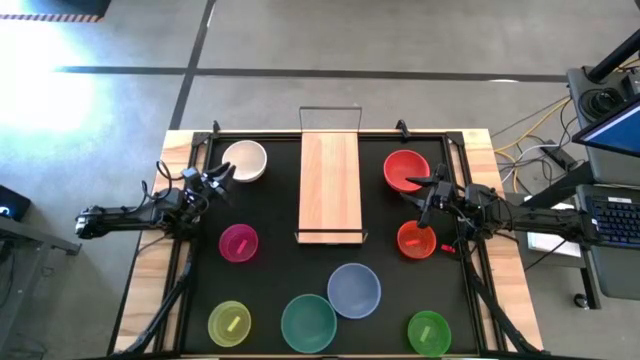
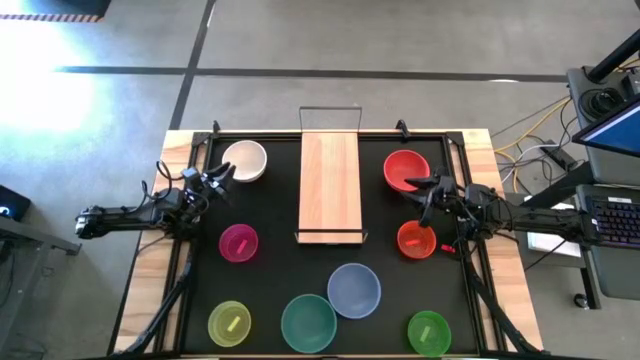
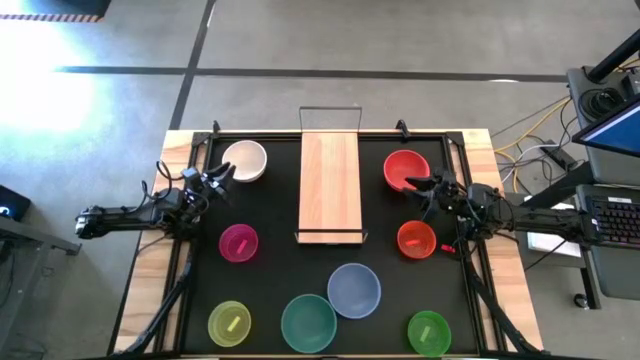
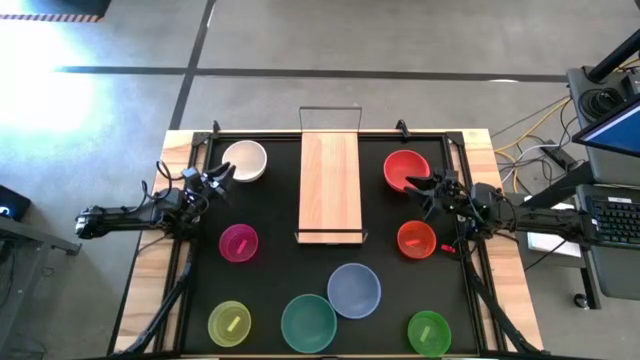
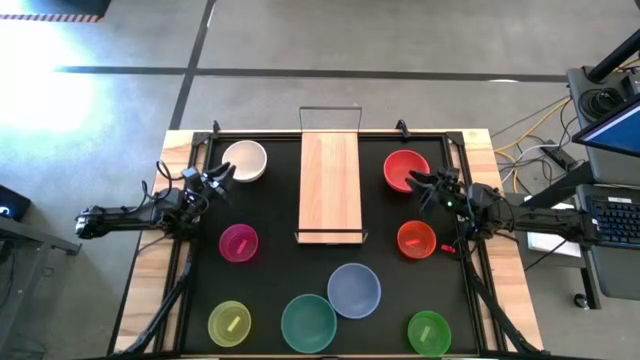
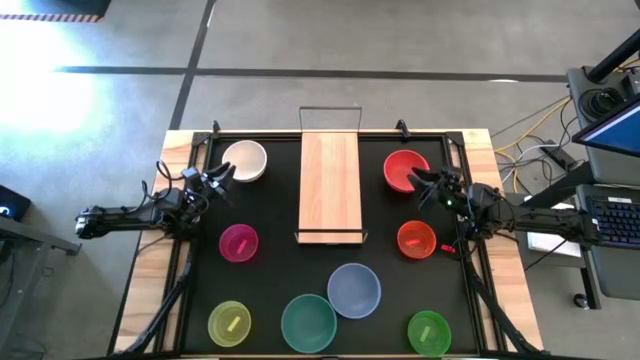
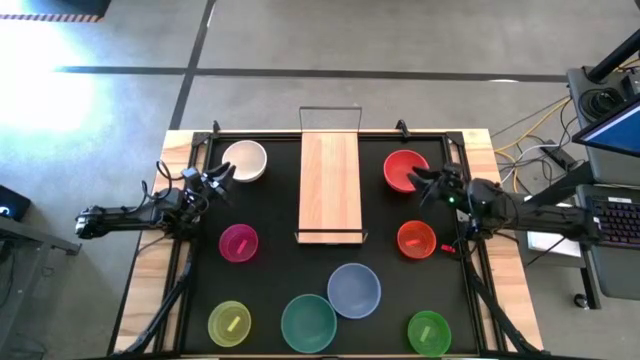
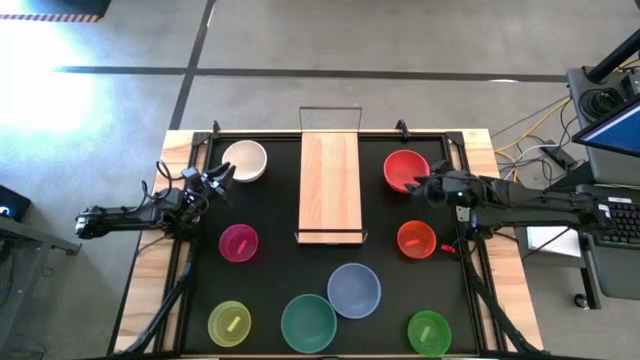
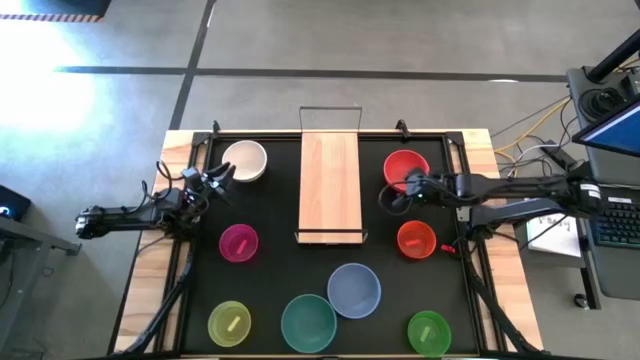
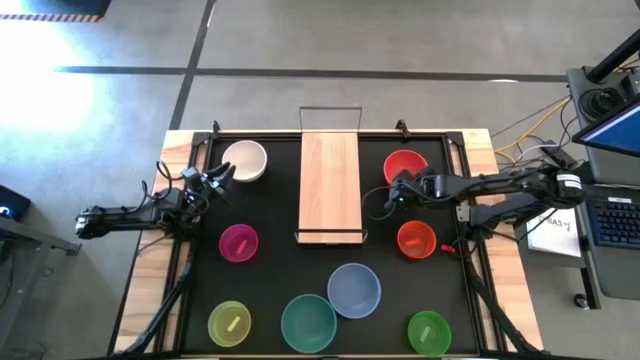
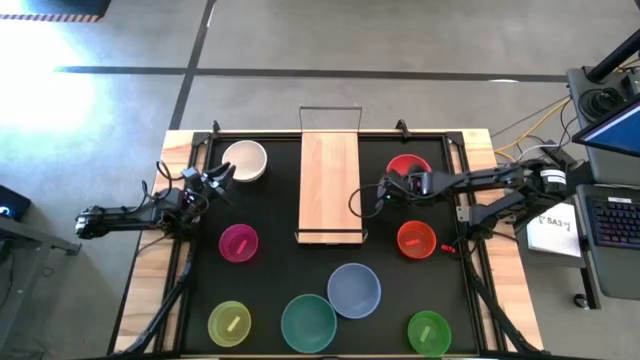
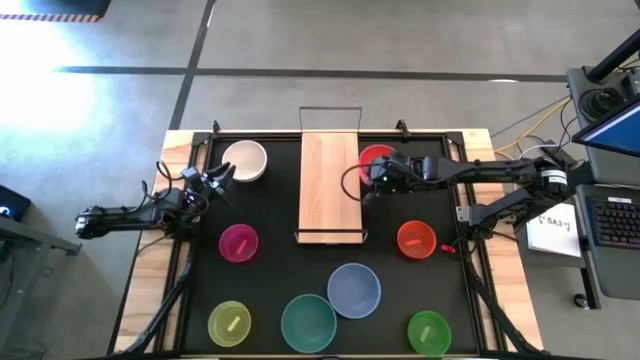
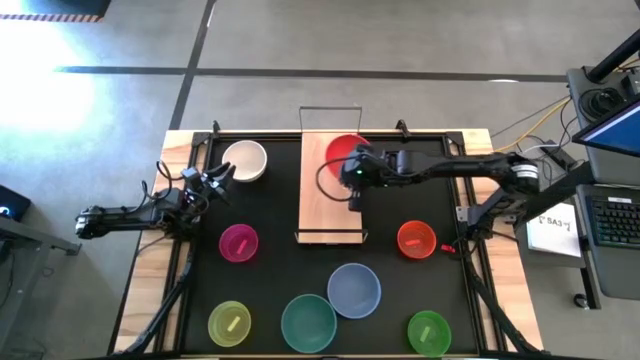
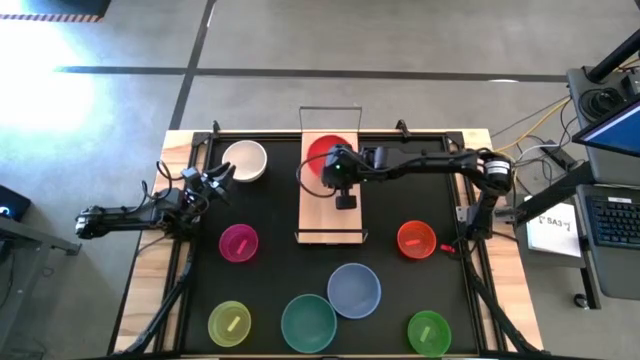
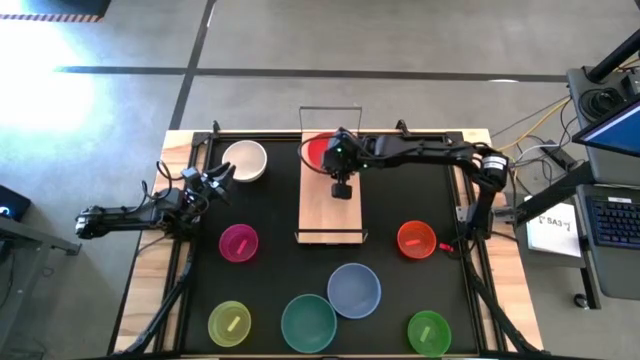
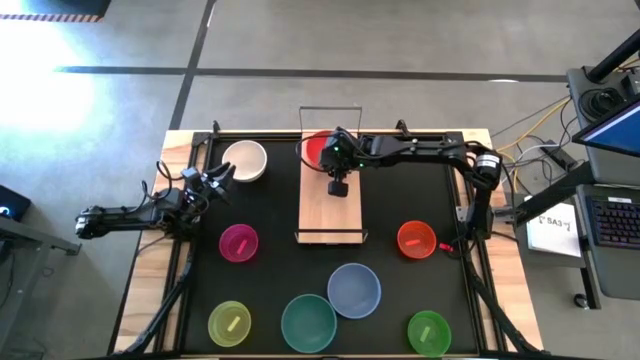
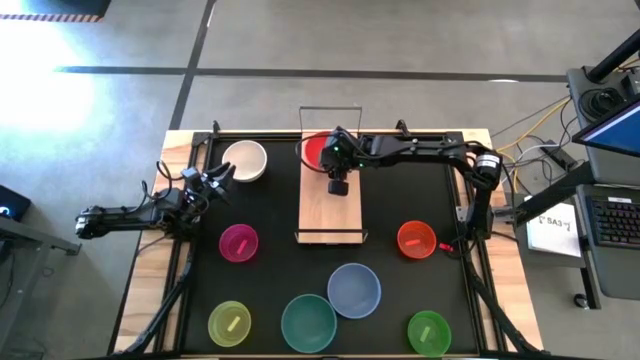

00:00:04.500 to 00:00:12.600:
Task: Place and stack bowls onto a shelf
Put the large orange bowl on the shelf

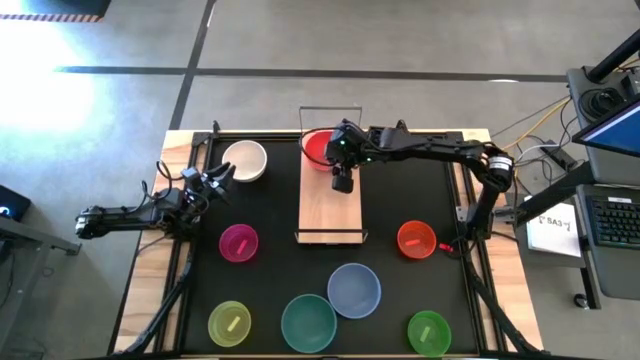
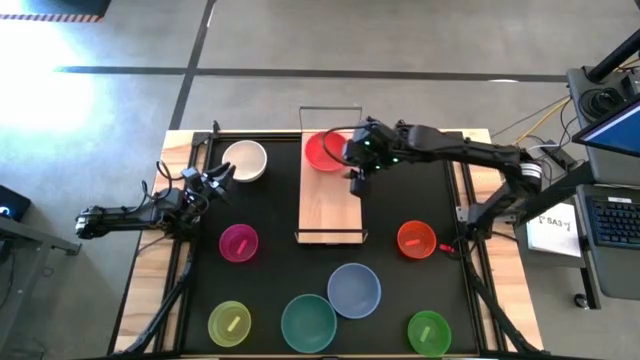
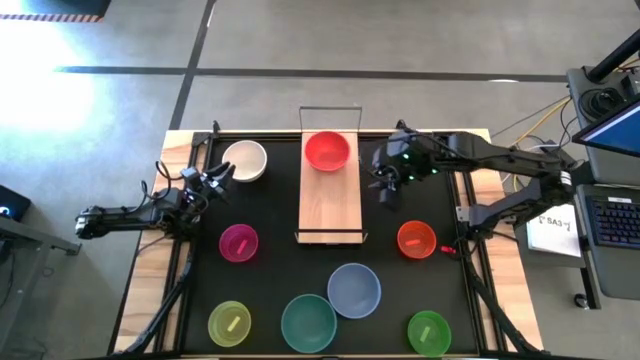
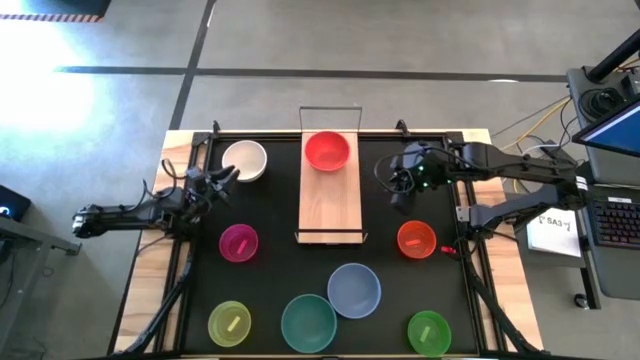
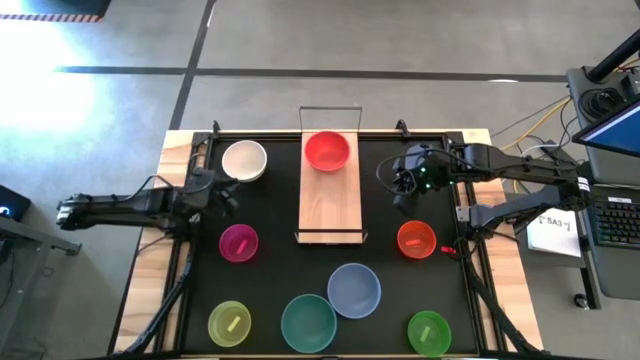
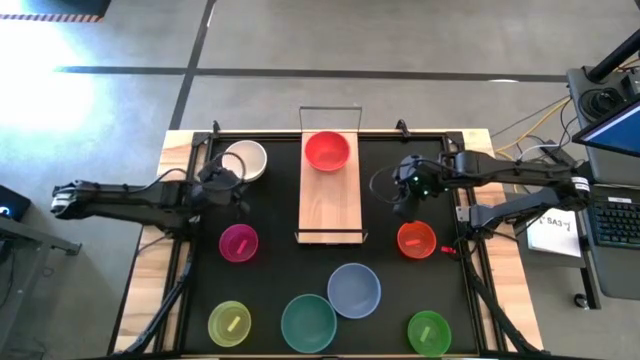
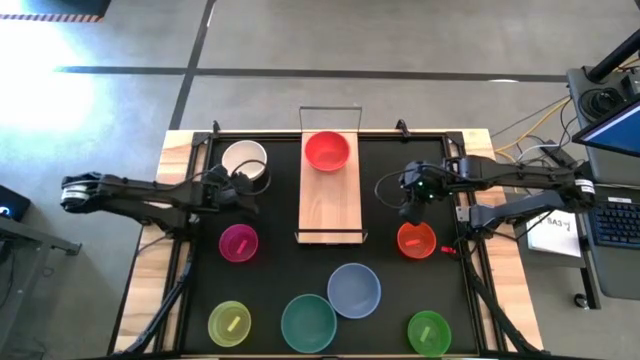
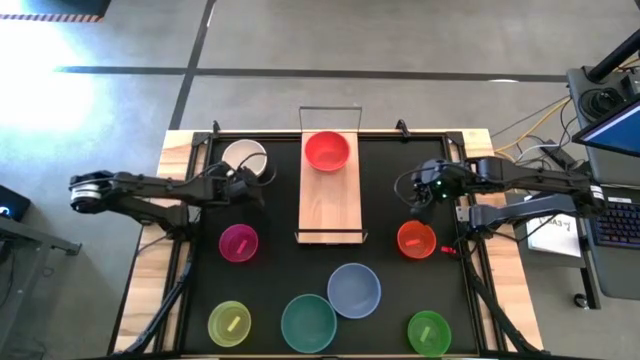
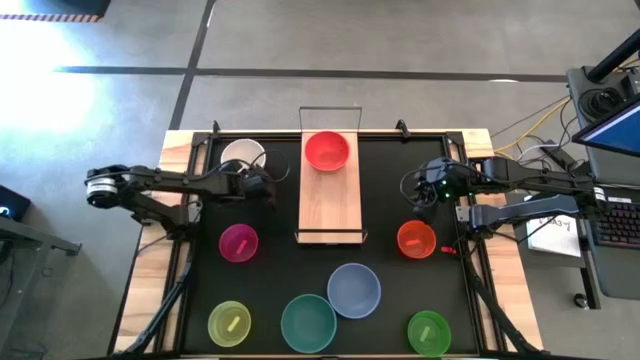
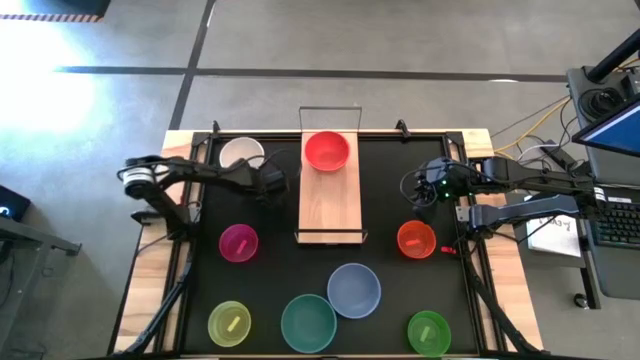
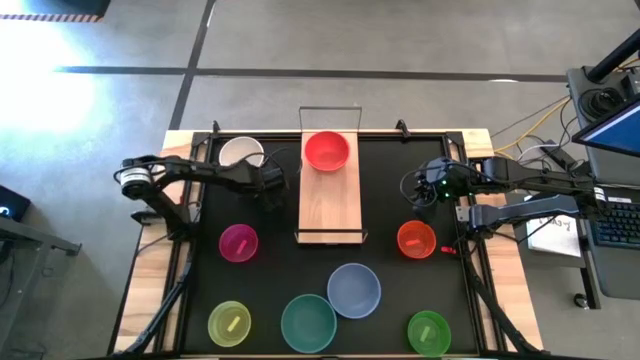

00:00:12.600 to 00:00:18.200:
Stack the large white bowl on top of the large orange bowl on the shelf

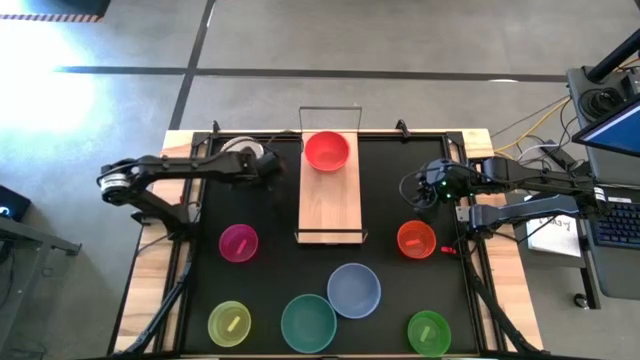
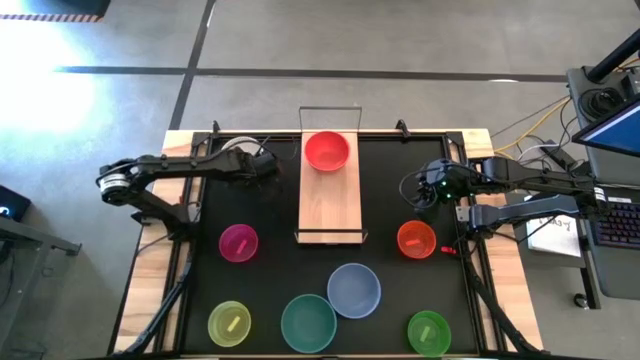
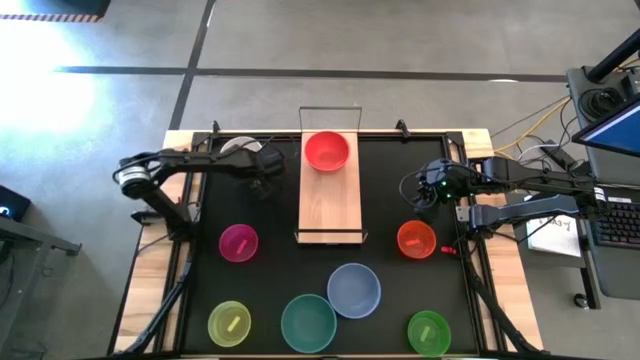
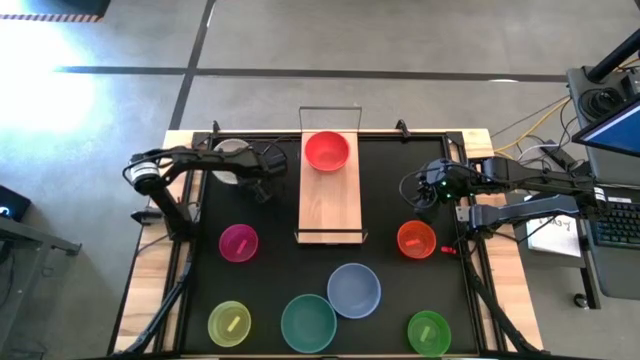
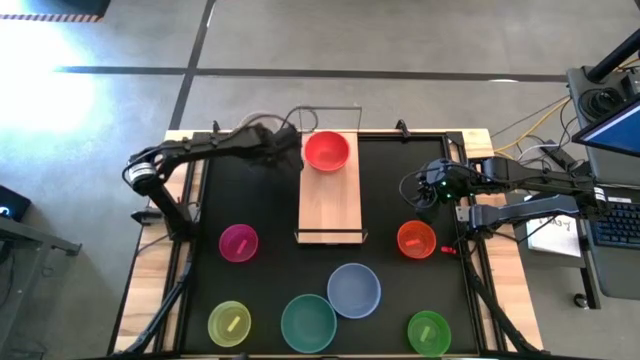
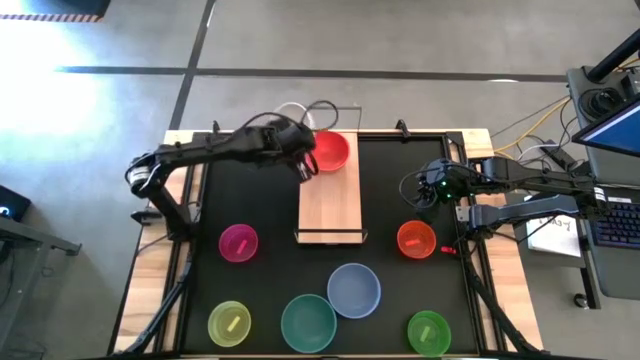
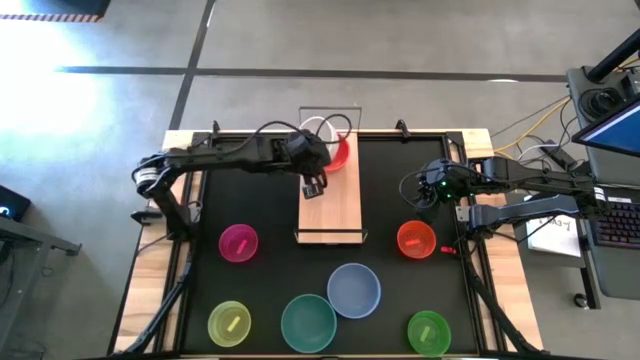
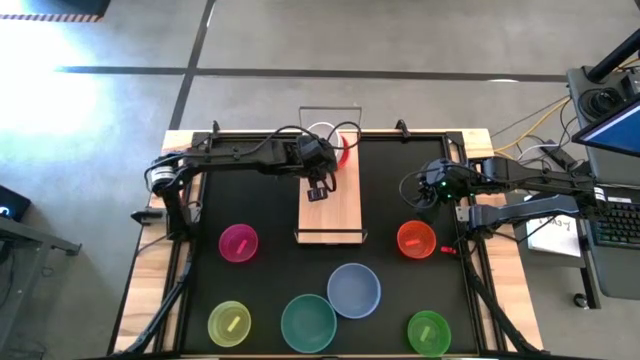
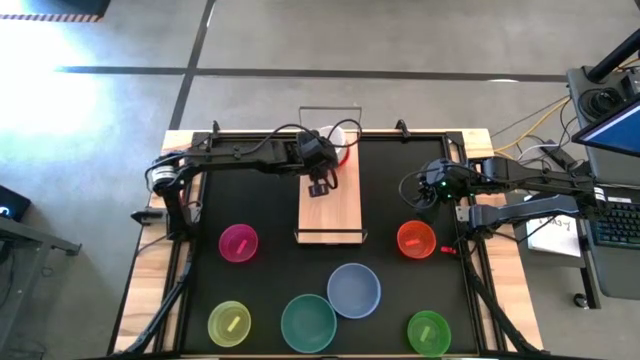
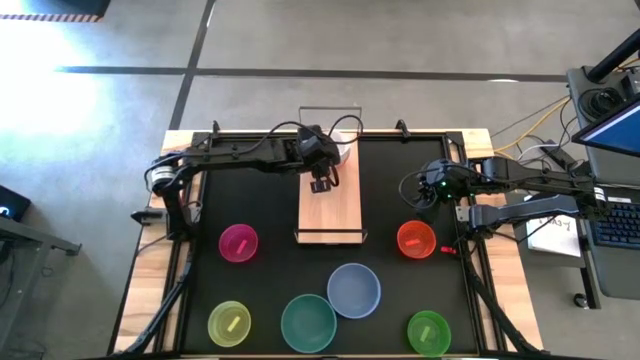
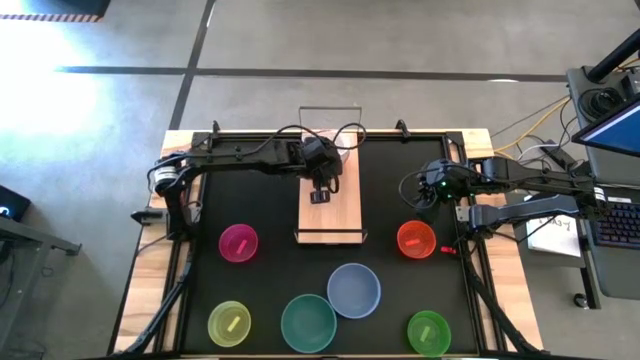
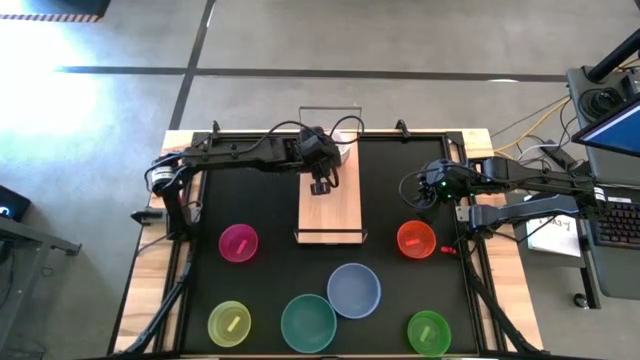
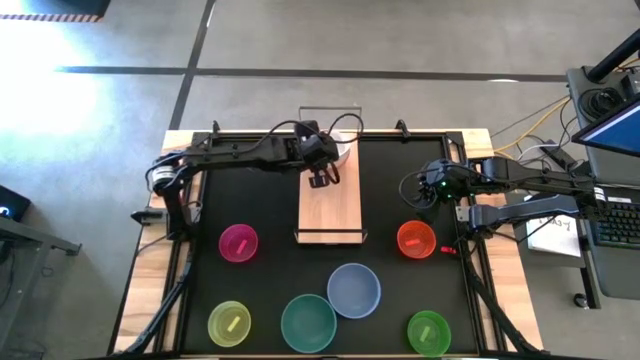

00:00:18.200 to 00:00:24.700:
Stack the large white bowl on top of the large orange bowl on the shelf

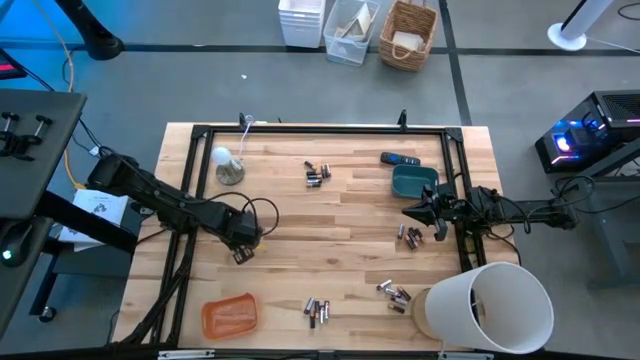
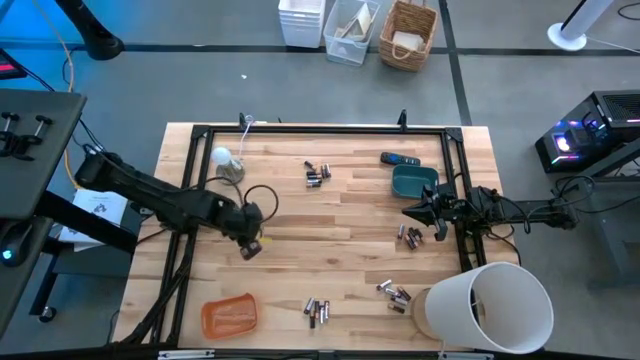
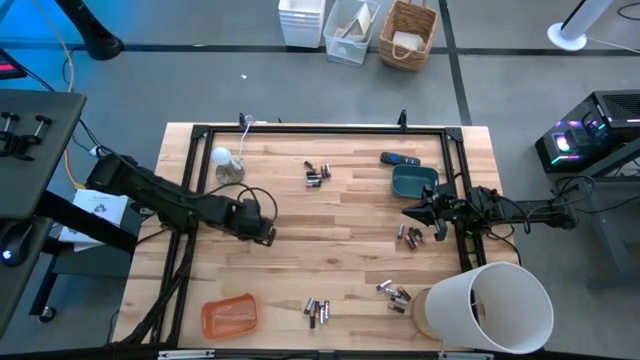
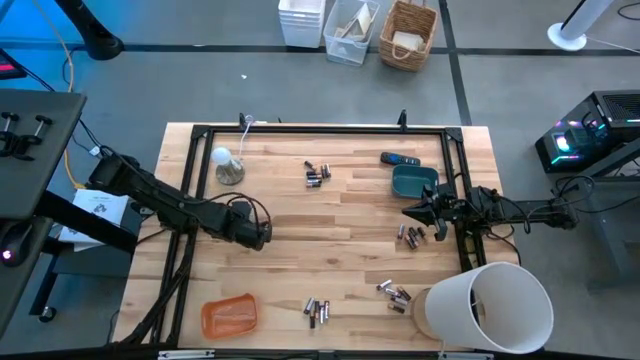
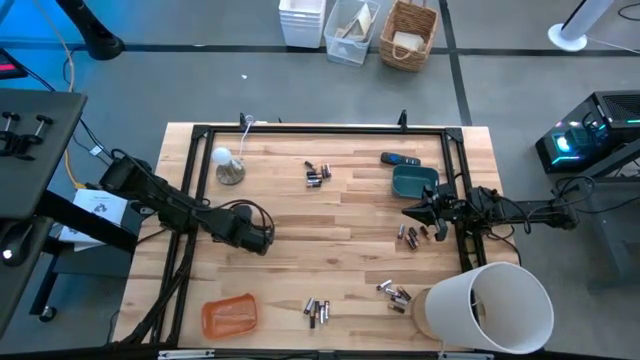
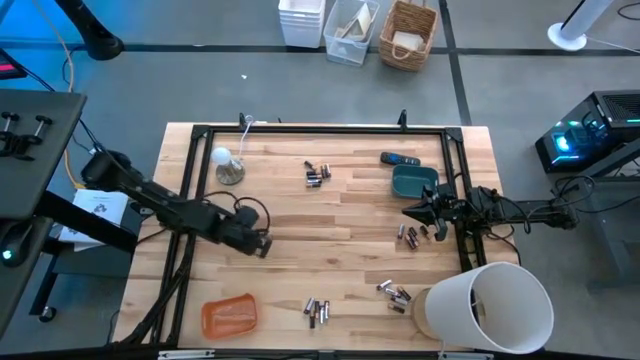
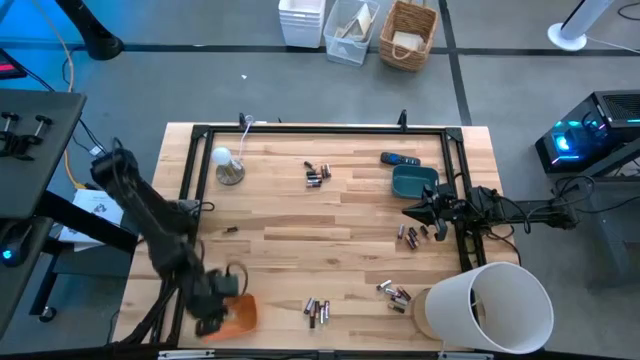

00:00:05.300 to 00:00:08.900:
Task: Sort batteries
Put the silver battery into the orange bin
